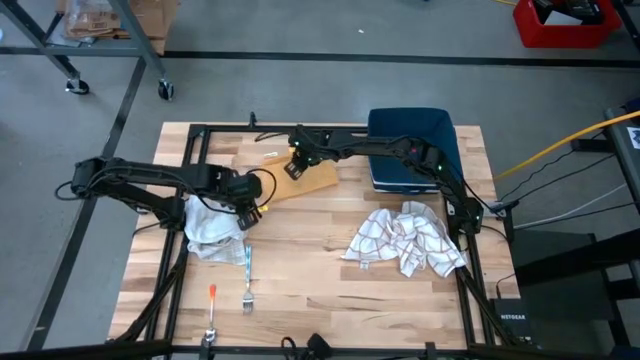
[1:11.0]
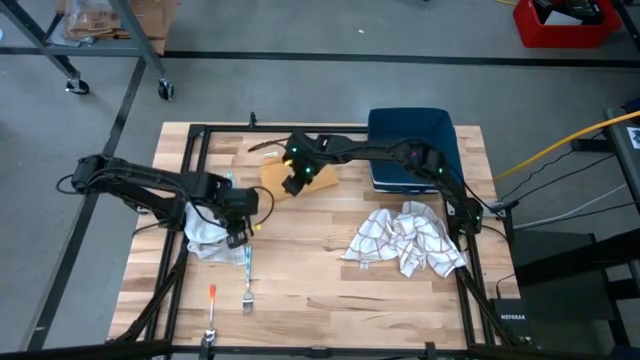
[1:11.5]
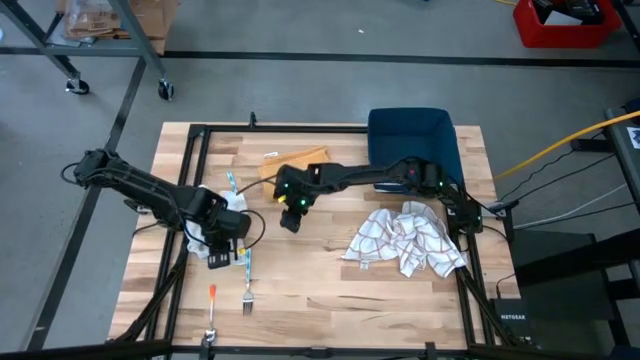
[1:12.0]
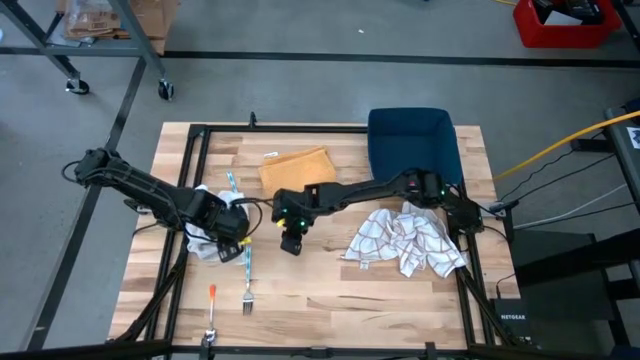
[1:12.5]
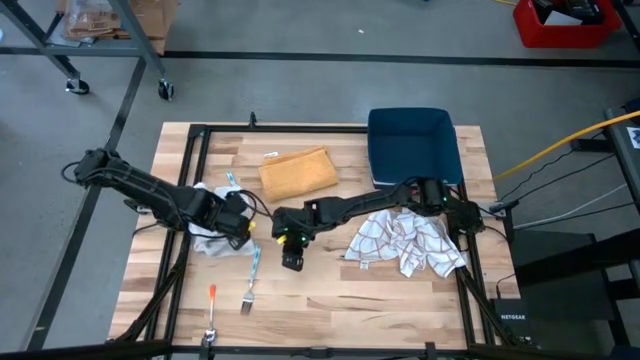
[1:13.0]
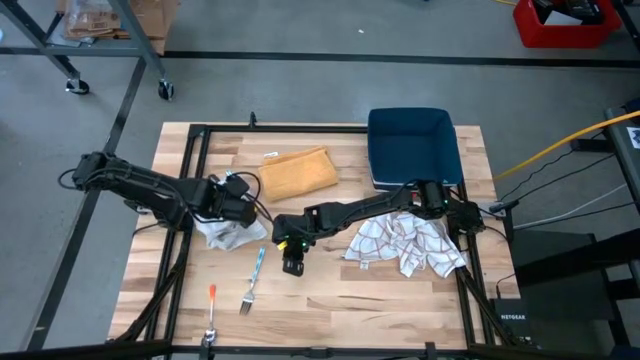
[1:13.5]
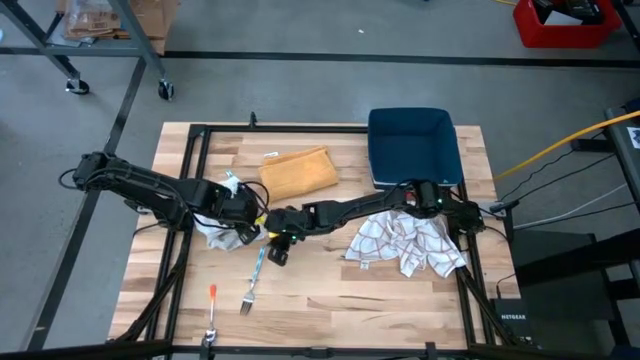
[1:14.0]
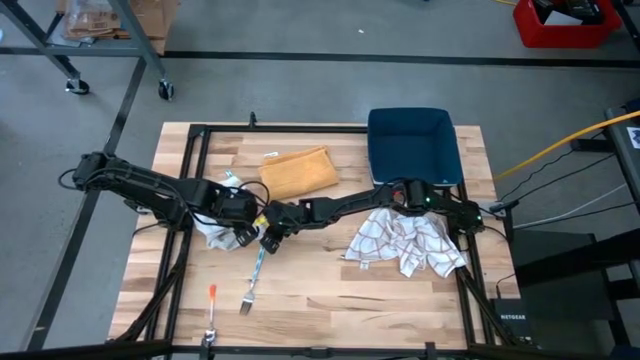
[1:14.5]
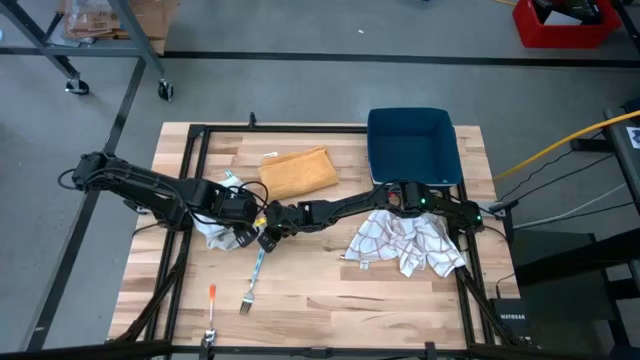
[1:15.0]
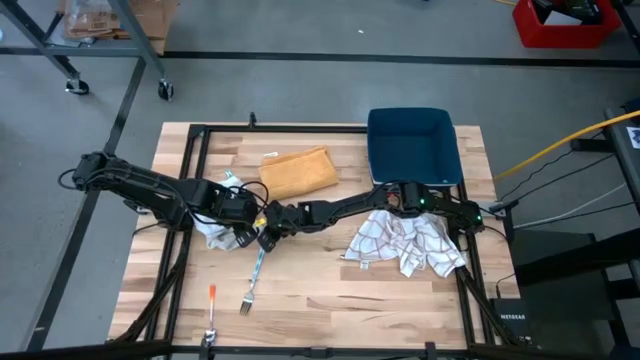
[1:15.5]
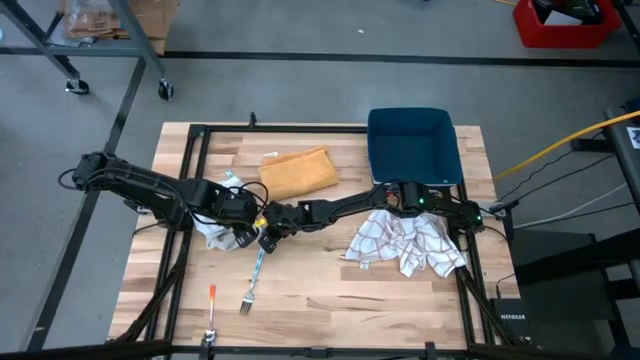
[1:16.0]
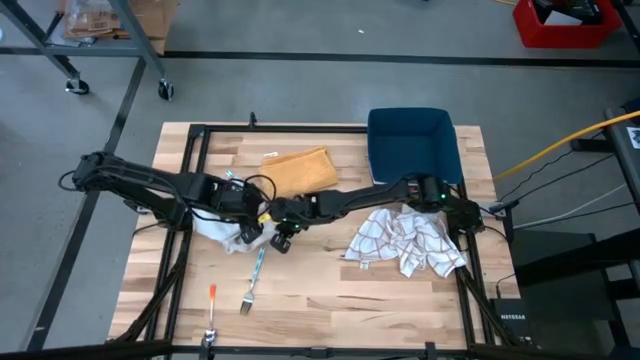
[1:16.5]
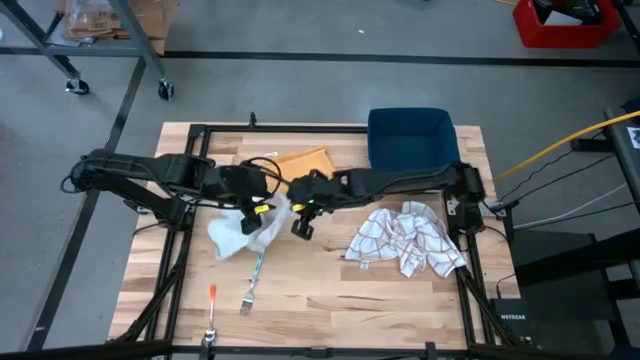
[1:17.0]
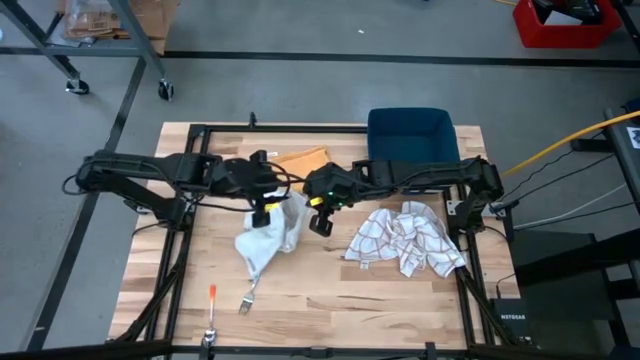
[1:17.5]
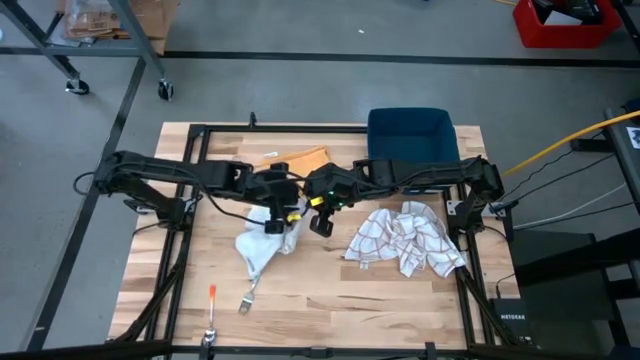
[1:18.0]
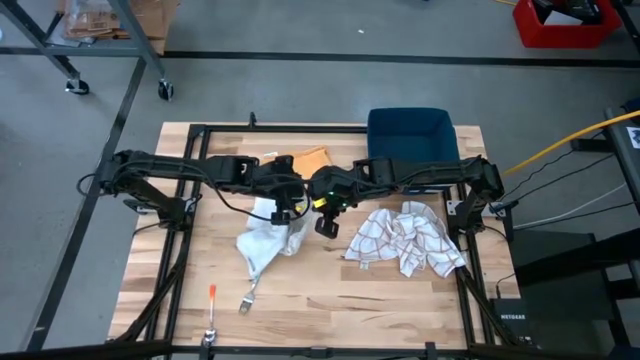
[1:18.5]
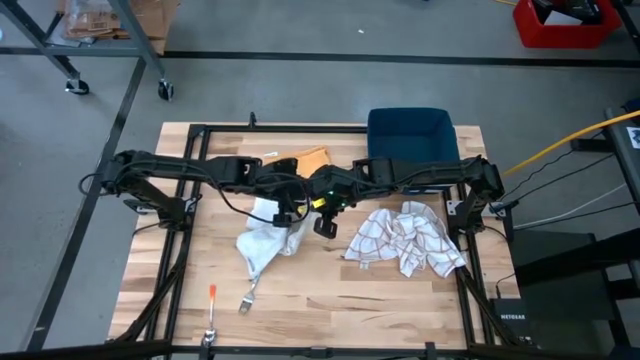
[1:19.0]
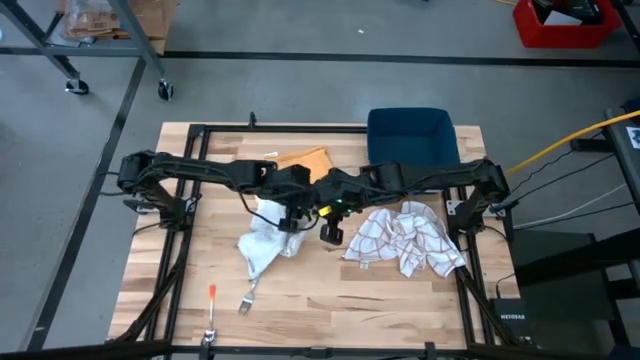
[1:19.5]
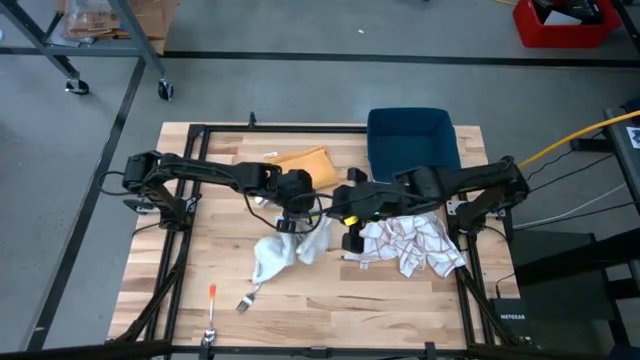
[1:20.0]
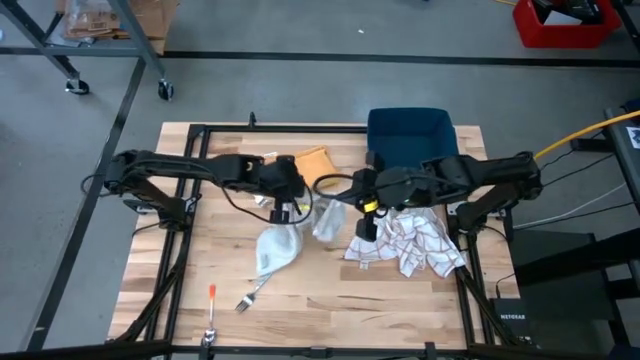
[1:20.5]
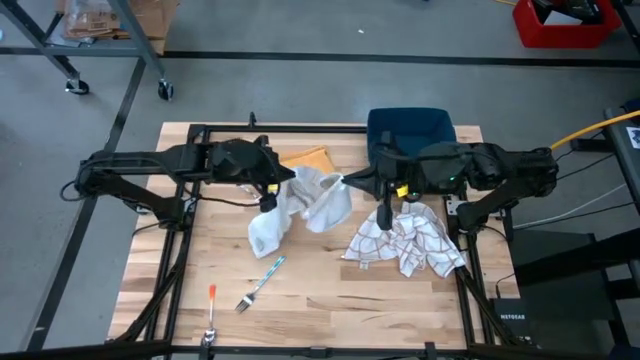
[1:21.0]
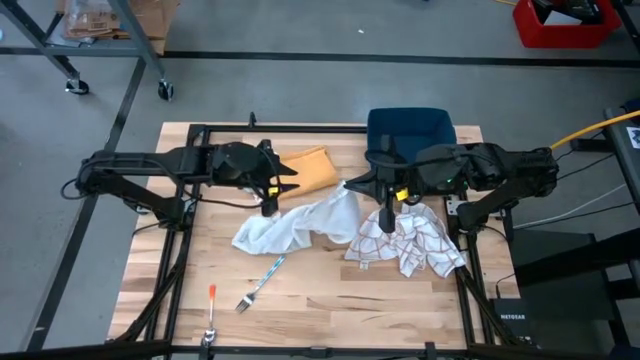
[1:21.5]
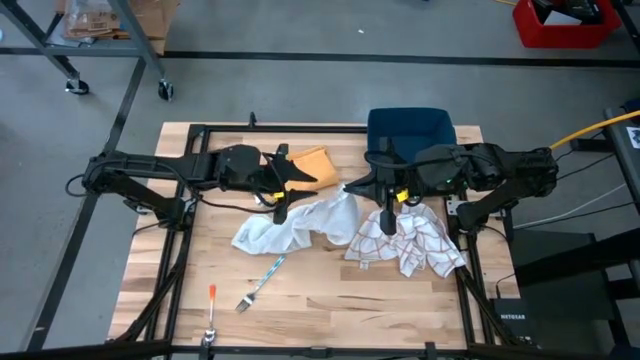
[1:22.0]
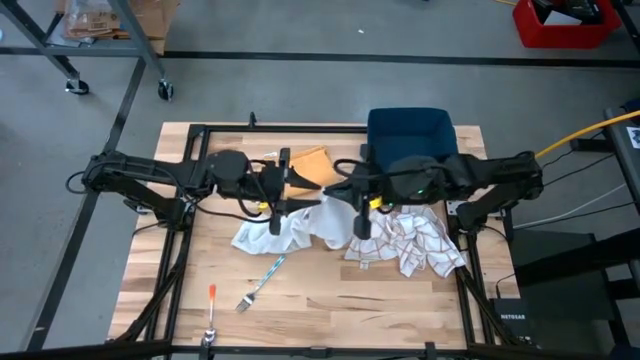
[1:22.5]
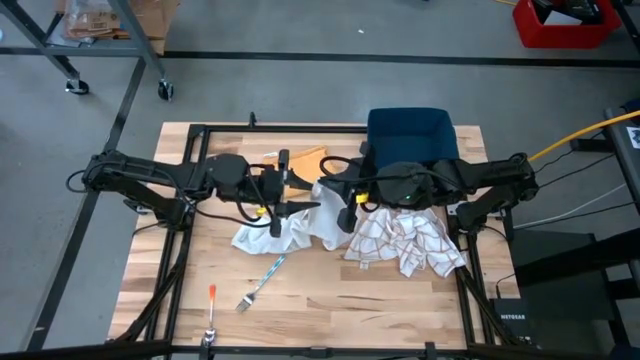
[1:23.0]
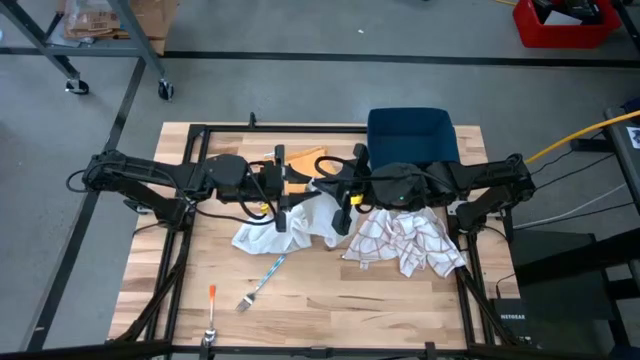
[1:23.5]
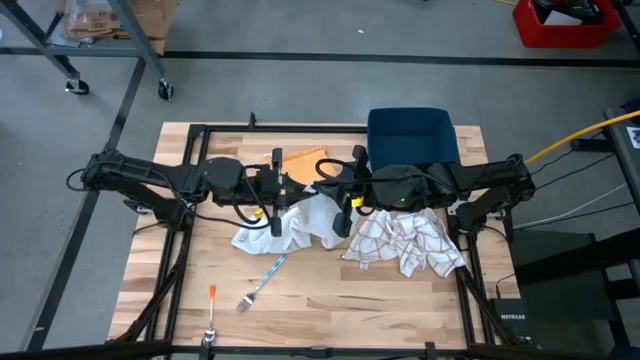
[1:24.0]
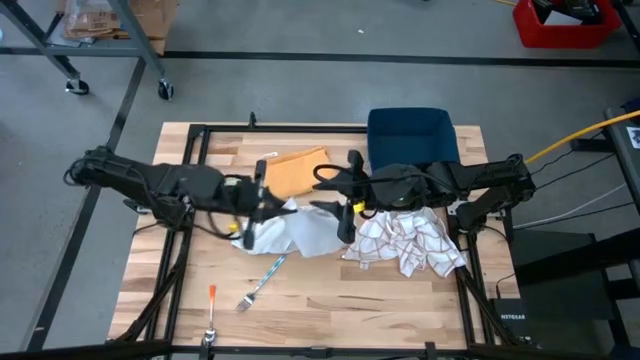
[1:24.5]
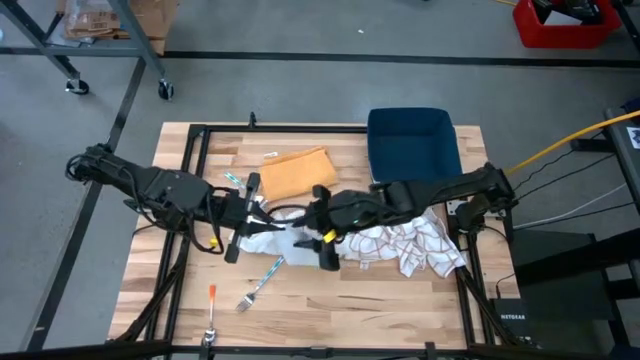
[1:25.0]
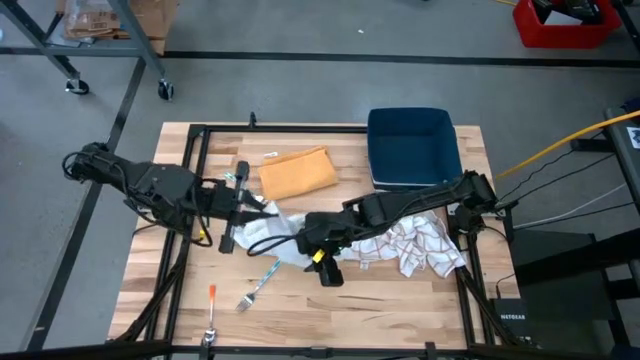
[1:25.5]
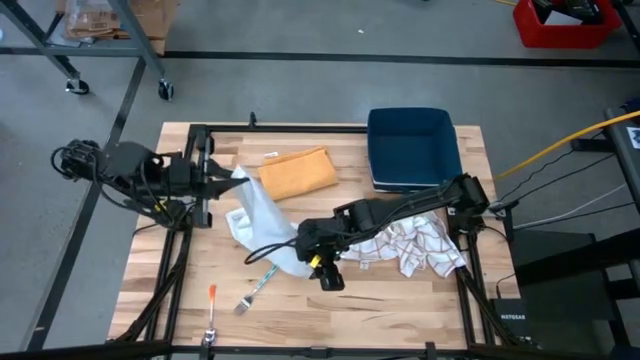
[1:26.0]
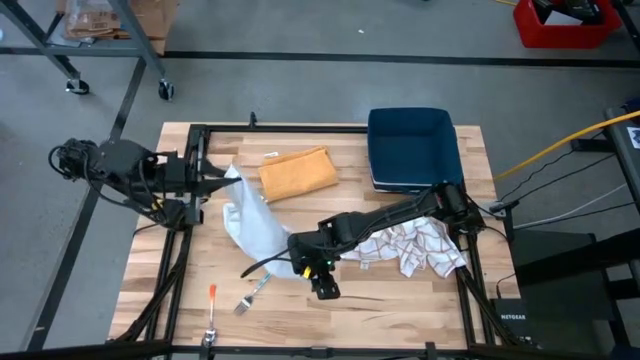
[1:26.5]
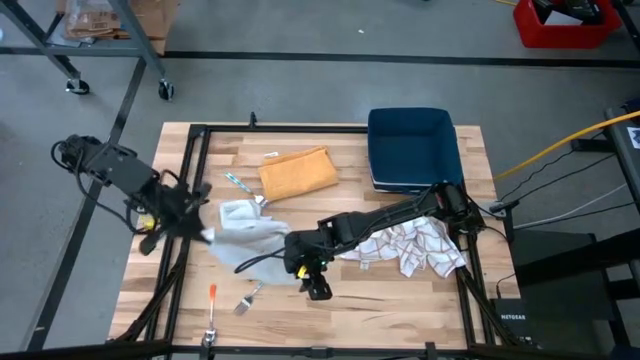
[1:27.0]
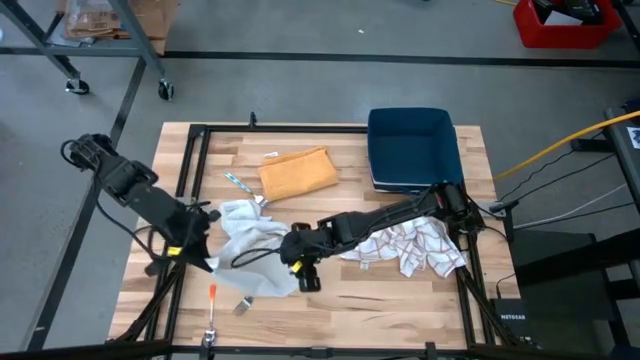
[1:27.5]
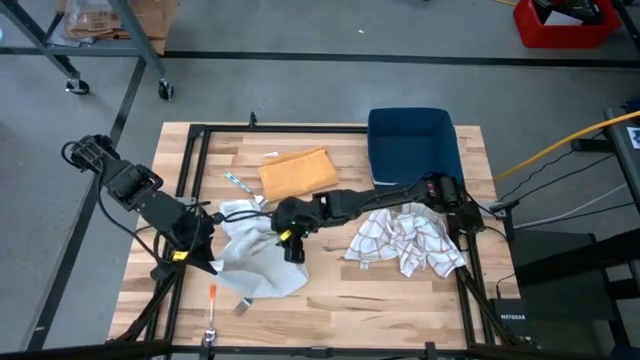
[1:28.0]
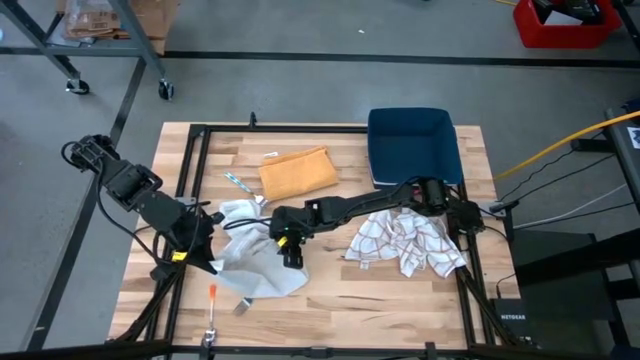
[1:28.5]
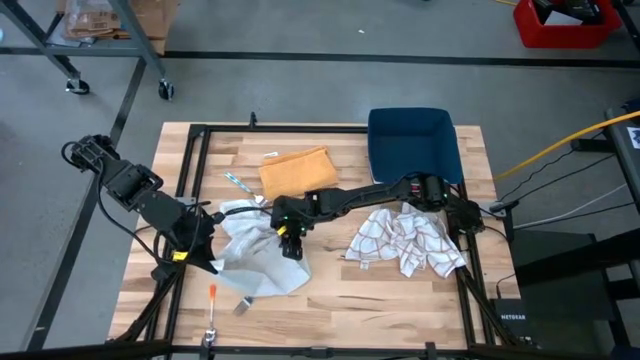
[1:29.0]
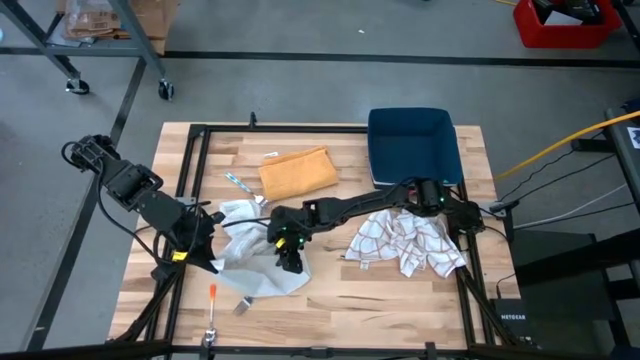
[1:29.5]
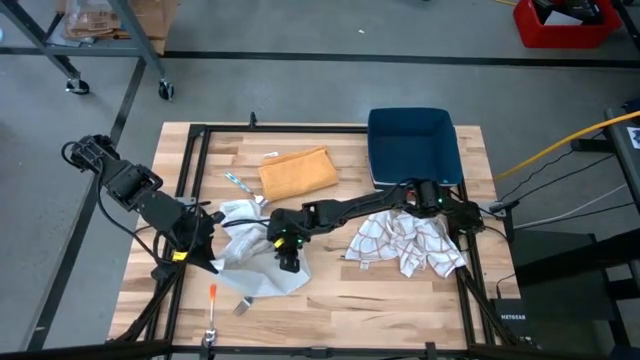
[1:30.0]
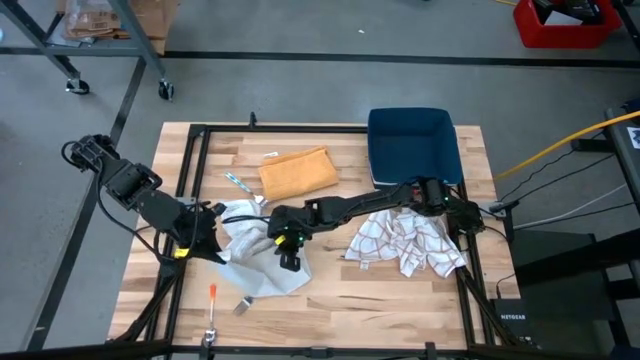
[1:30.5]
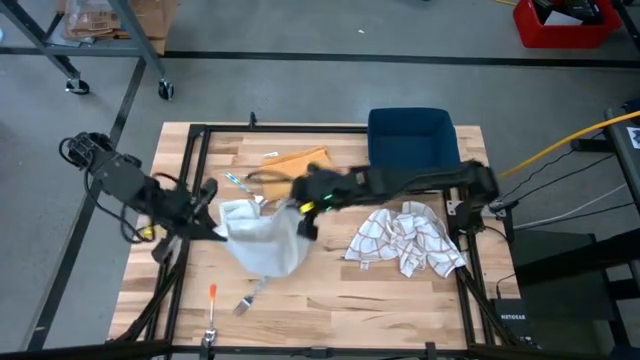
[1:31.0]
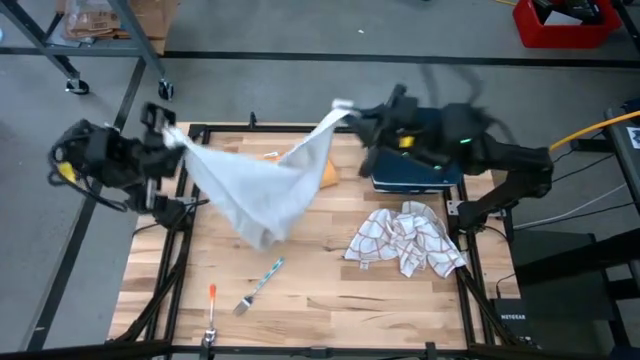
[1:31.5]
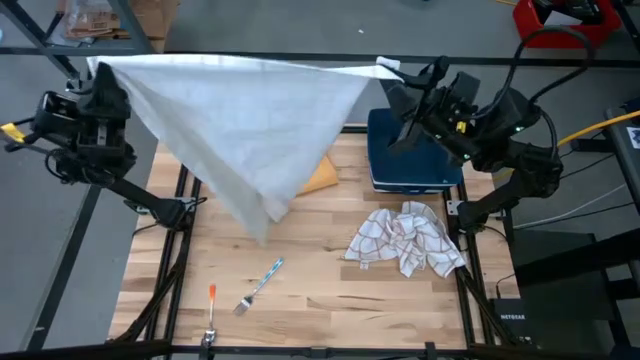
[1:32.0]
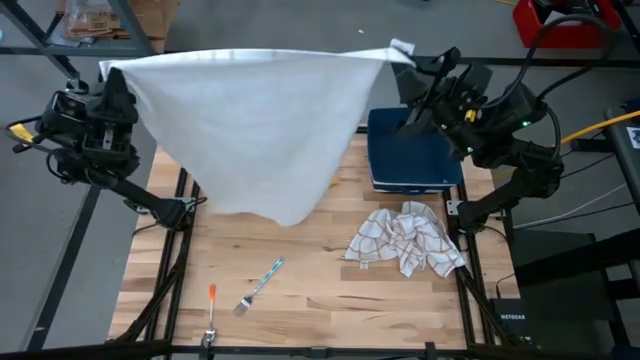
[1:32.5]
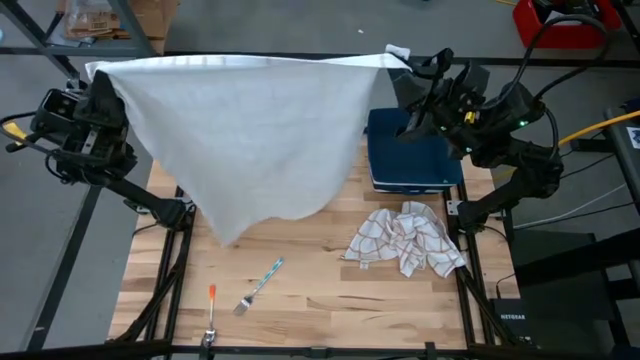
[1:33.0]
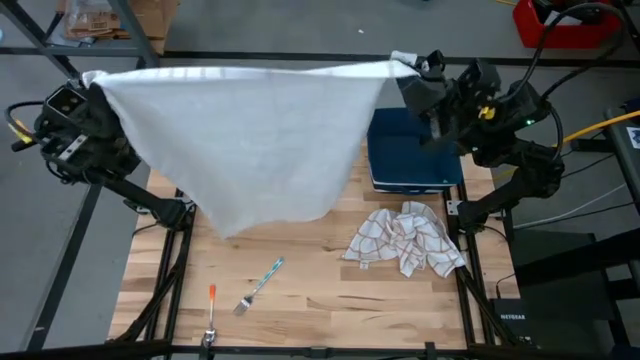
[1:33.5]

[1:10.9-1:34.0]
Task: Fold towel
Fold the left white towel
